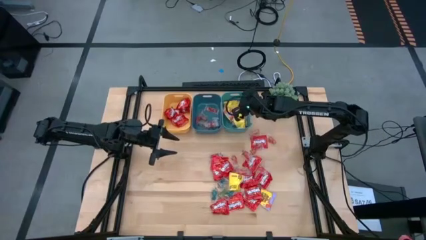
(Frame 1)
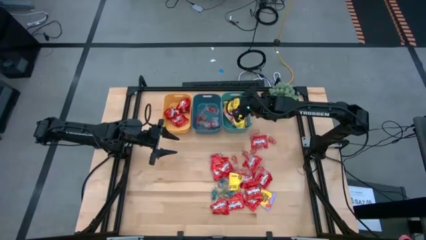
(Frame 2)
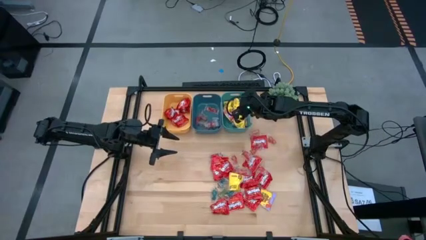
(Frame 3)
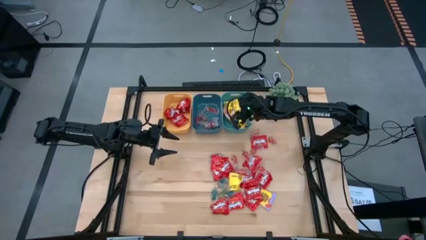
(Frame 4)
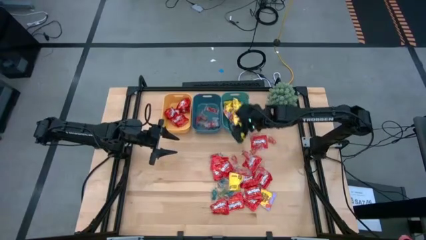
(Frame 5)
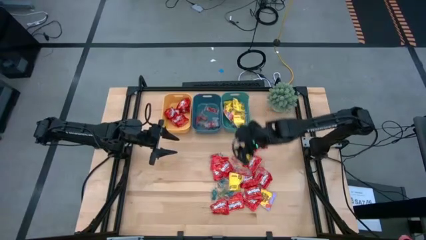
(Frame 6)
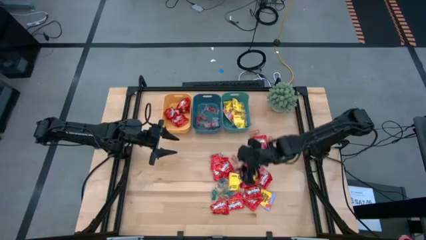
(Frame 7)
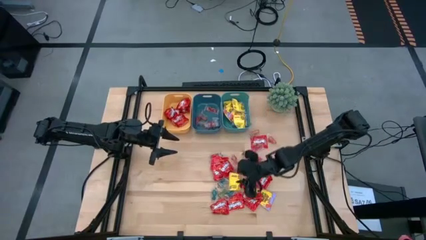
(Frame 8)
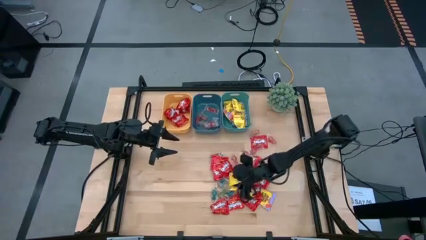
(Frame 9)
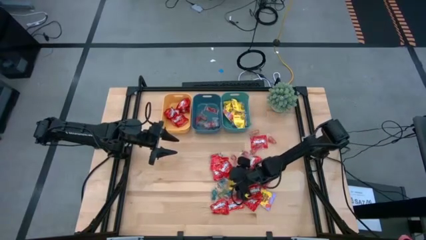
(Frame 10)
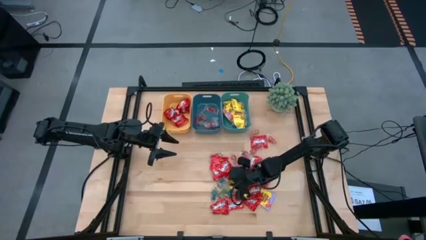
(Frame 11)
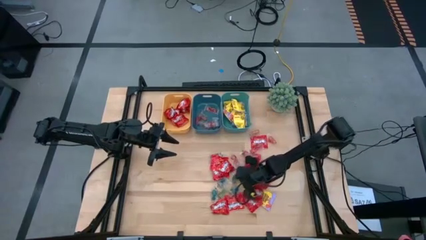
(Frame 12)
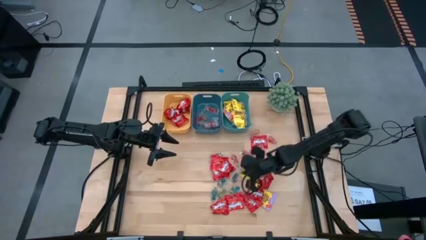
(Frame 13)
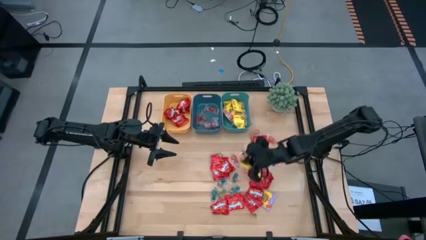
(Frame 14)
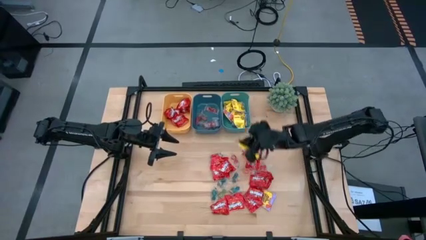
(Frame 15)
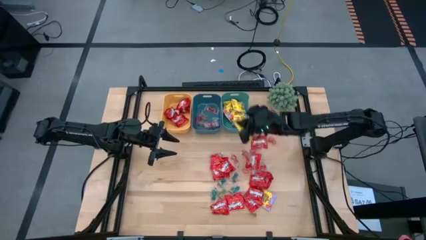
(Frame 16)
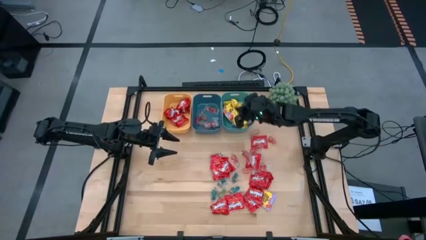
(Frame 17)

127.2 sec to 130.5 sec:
Task: Sort candy
Put the yellow candy into the green bin

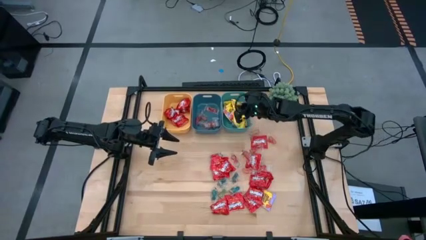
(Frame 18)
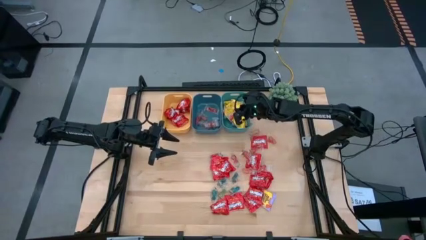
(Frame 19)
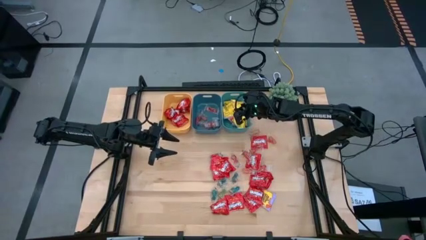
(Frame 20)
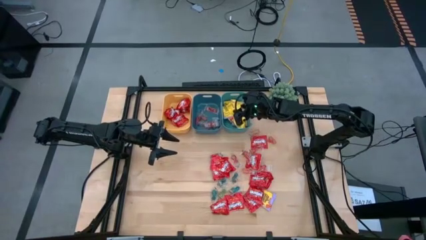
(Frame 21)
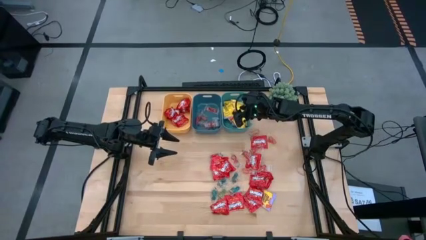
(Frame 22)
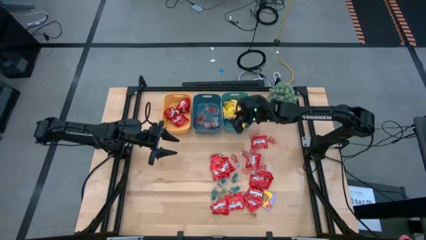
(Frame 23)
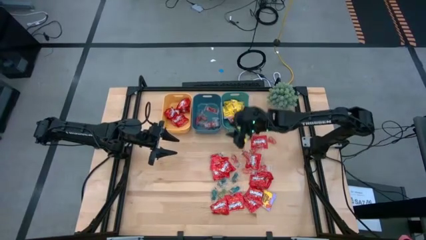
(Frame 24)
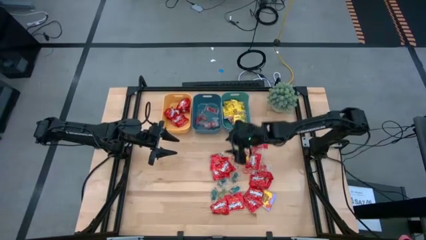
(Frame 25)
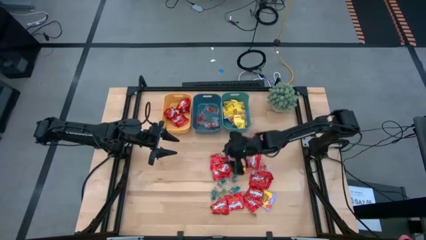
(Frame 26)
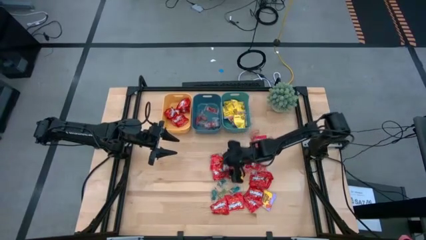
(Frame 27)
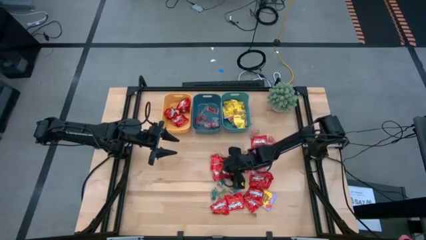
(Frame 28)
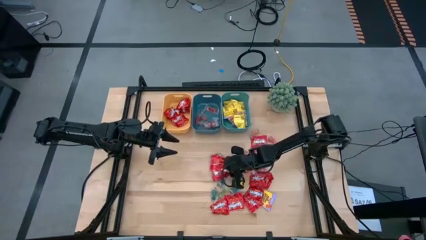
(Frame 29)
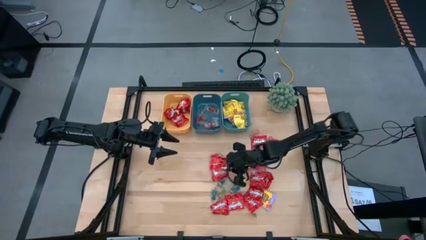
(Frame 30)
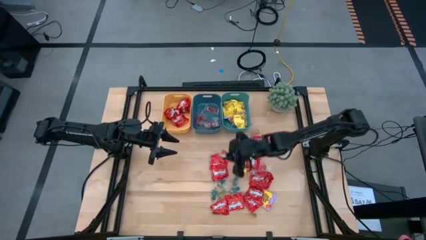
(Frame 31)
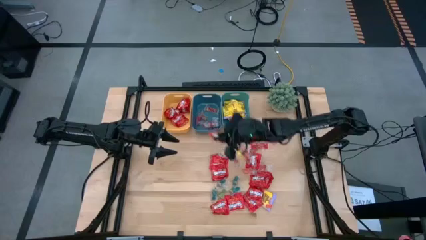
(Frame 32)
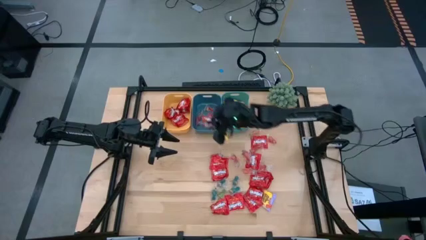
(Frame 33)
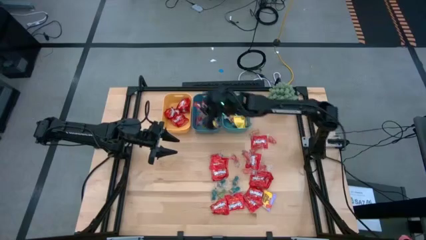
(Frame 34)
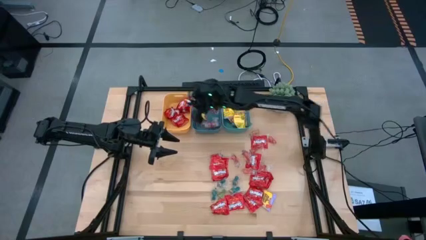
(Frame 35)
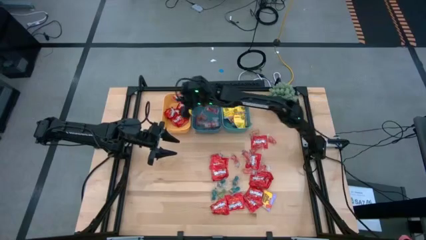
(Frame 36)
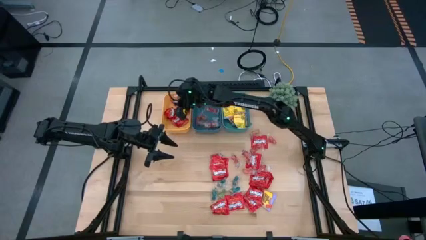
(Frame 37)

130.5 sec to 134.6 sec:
Put the red candy into the yellow bin

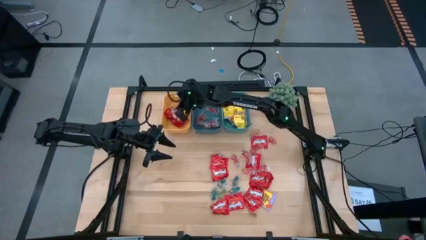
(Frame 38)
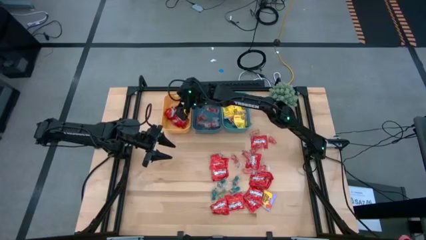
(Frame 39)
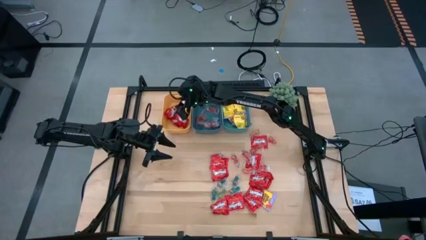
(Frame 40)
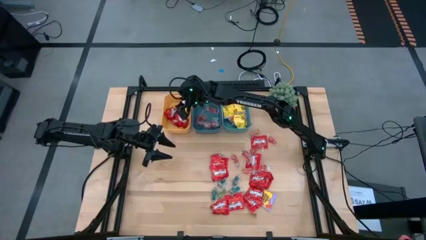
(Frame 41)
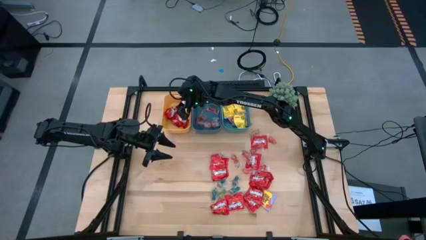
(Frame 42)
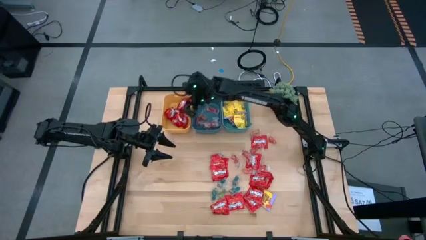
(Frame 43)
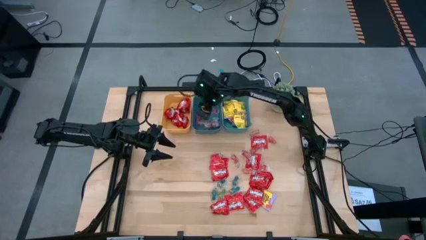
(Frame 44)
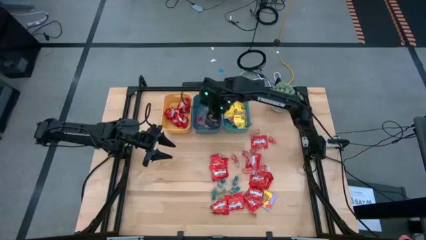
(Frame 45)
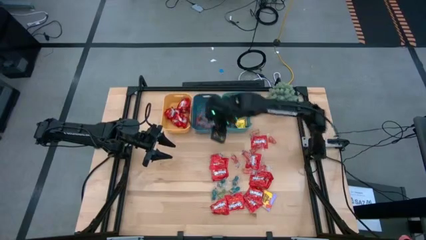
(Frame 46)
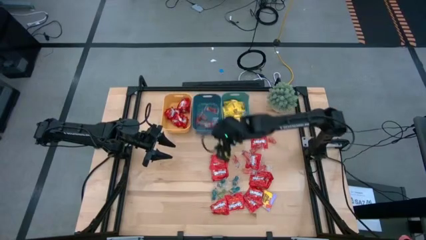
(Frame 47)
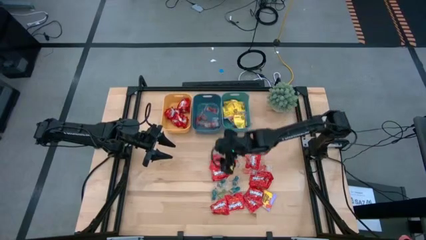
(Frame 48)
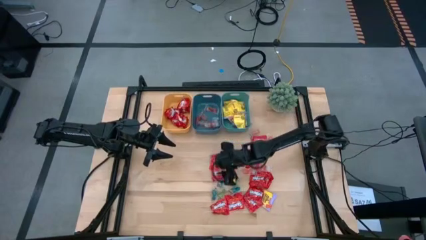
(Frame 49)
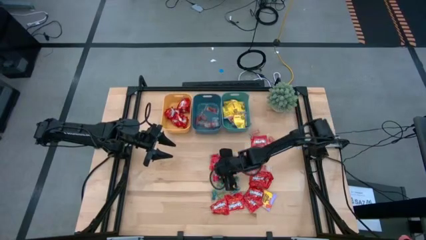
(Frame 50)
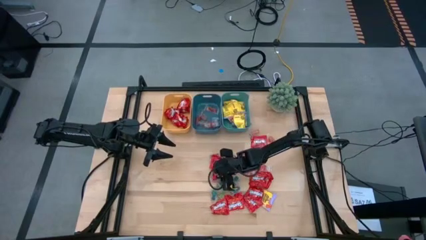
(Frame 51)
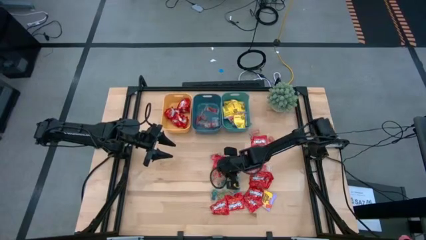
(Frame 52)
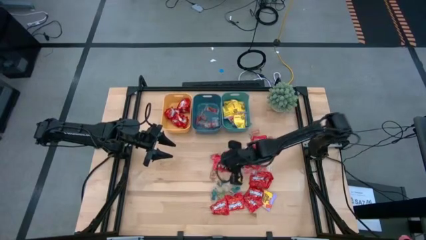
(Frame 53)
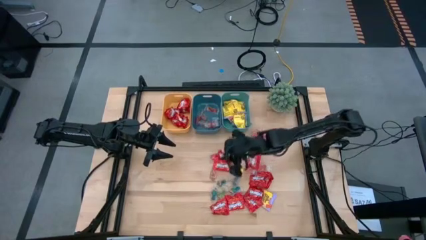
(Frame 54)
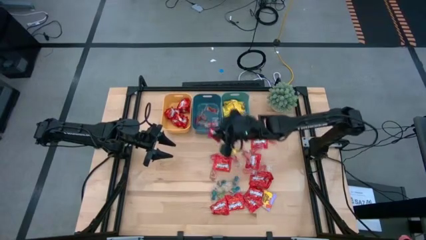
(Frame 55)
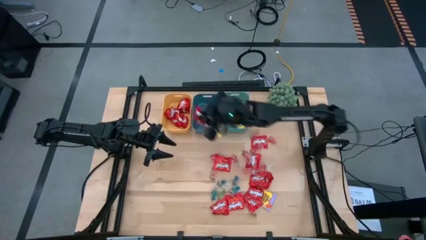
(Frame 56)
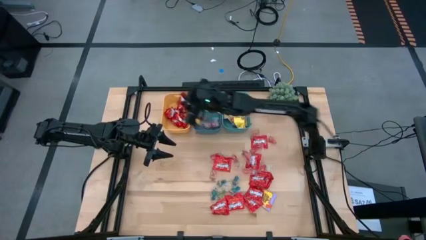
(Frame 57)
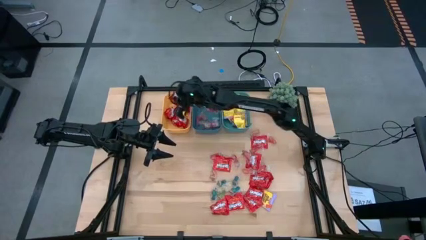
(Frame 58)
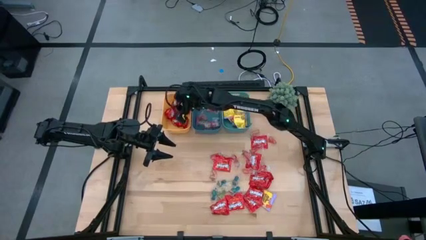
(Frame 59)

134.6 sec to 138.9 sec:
Put the red candy into the yellow bin

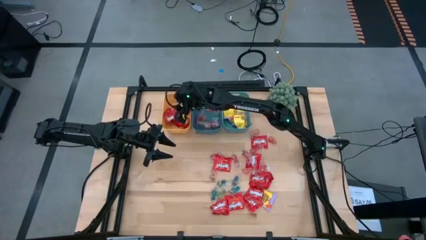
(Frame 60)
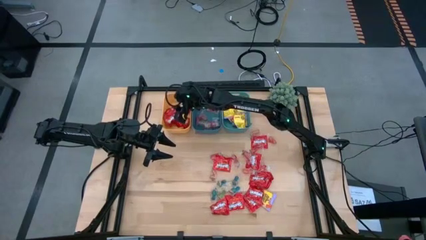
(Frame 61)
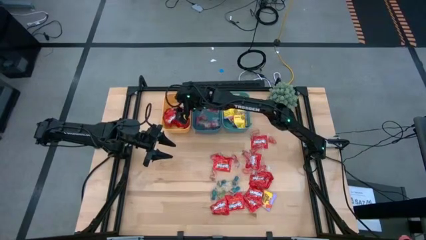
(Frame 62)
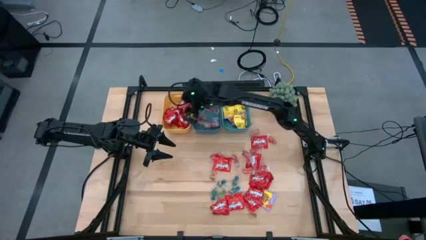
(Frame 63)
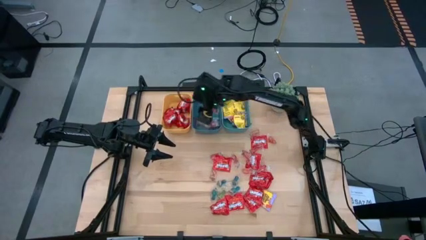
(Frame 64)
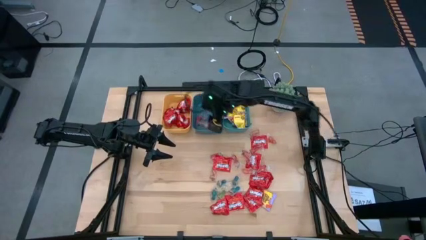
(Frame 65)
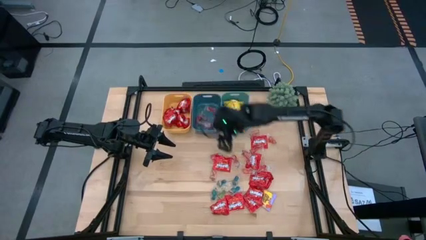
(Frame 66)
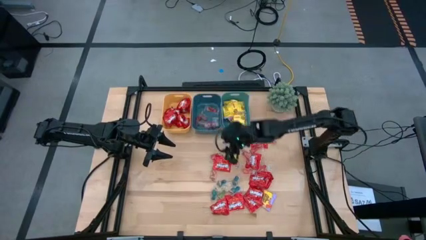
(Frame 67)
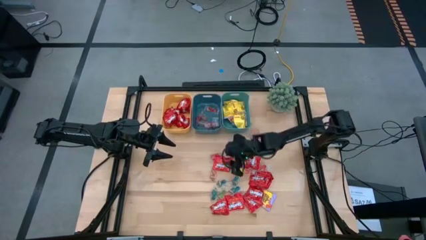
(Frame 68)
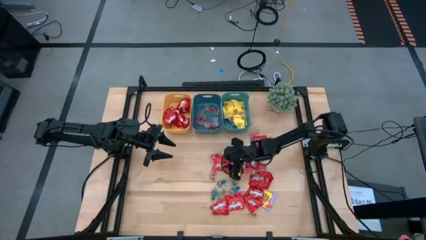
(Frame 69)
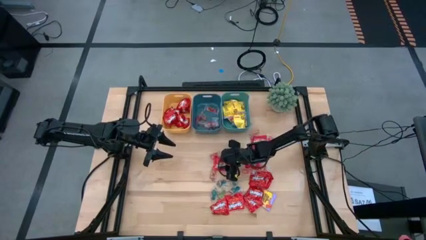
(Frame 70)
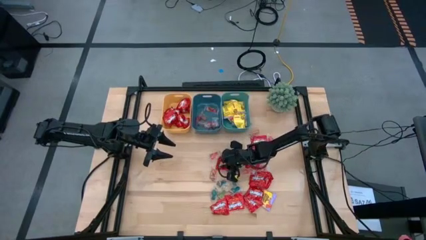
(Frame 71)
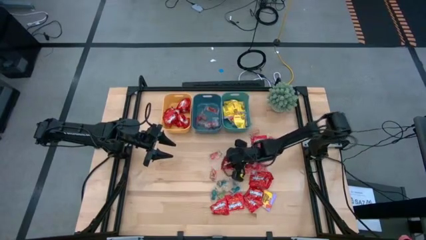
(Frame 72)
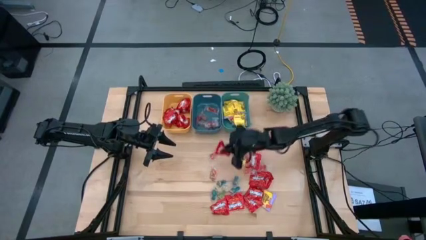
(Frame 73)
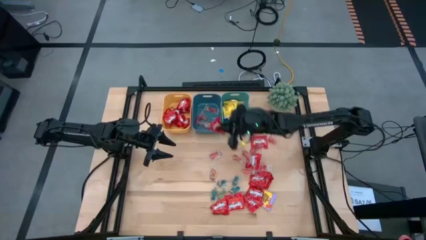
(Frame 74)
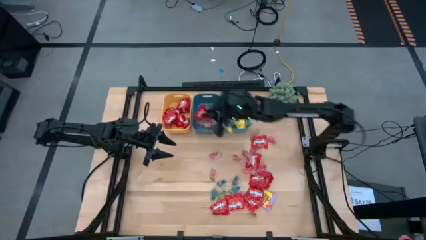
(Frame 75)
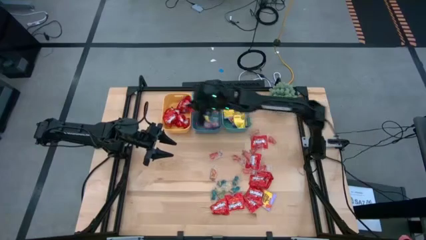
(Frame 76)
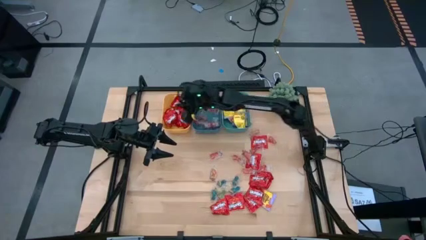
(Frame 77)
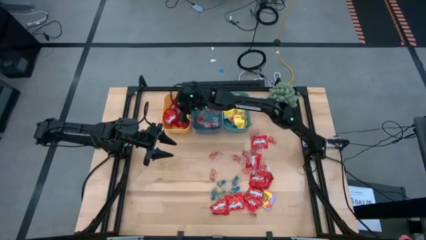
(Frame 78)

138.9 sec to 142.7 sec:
Put the red candy into the yellow bin

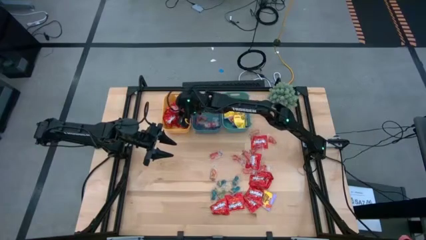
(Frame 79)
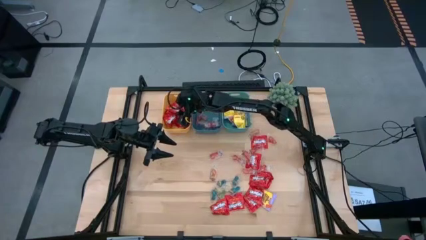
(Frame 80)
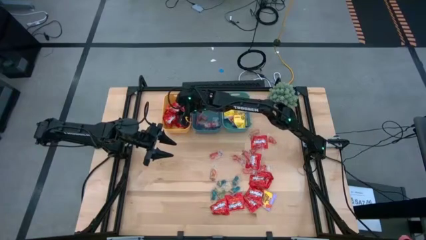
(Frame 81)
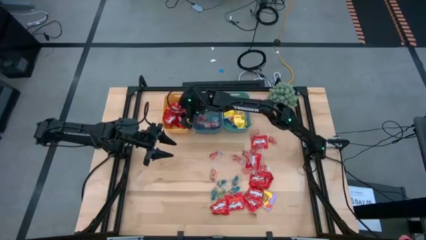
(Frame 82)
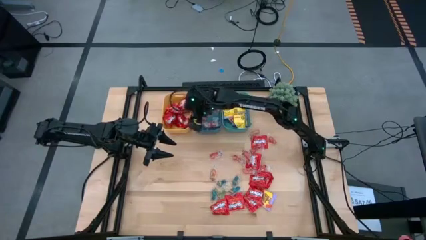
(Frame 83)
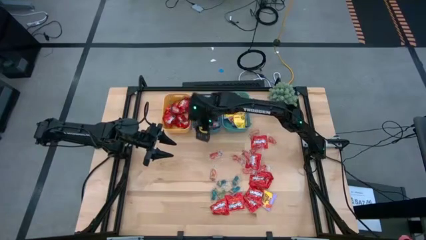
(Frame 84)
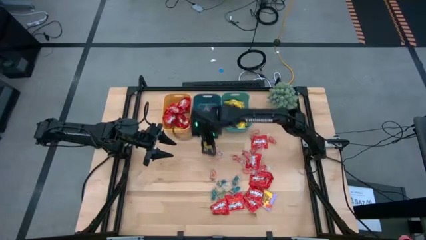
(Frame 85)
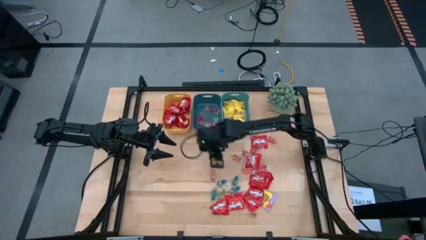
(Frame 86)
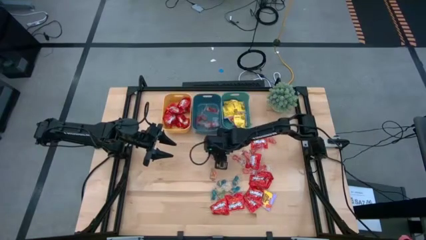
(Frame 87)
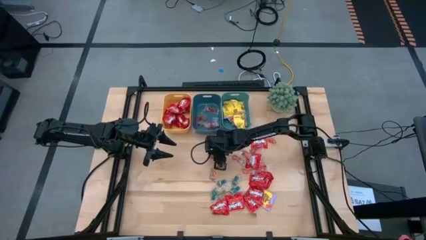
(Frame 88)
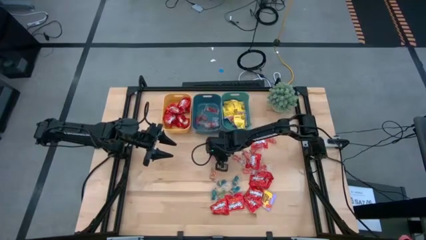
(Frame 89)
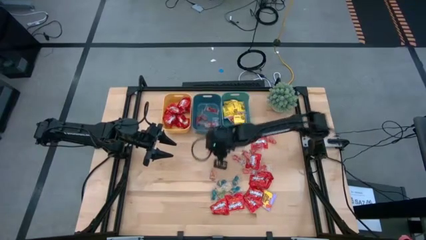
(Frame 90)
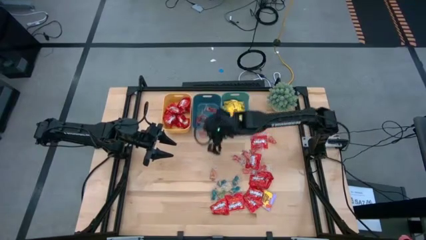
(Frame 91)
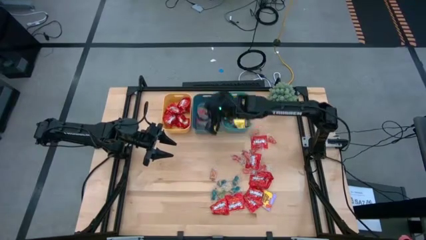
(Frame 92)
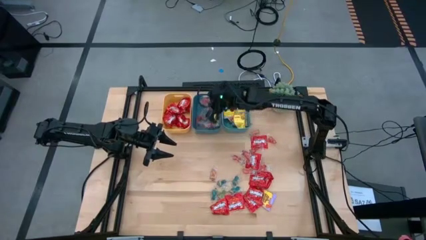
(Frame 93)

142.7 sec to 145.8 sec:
Put the transparent red gummy into the blue bin
